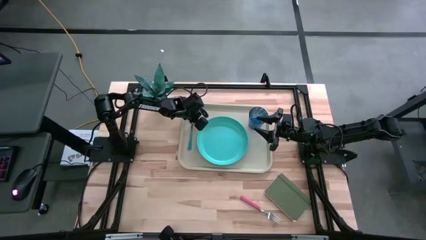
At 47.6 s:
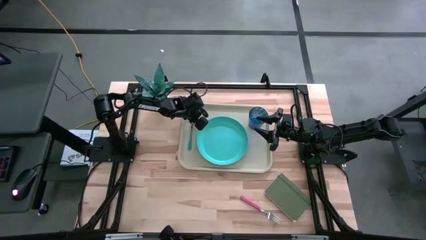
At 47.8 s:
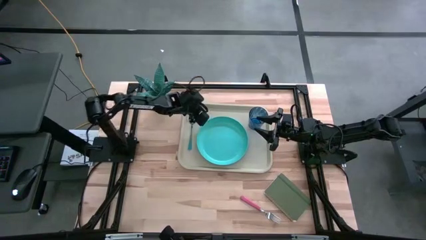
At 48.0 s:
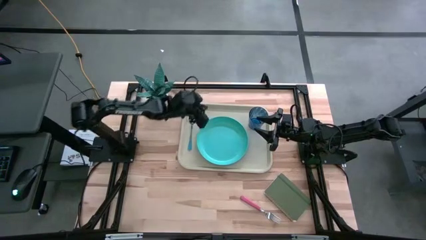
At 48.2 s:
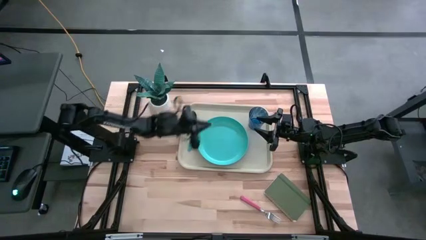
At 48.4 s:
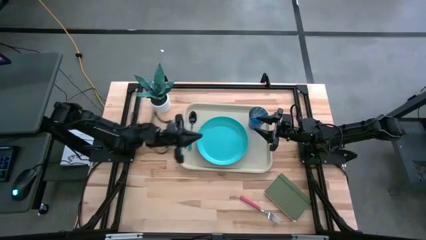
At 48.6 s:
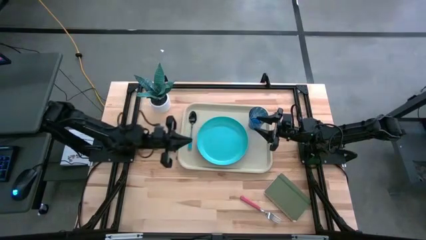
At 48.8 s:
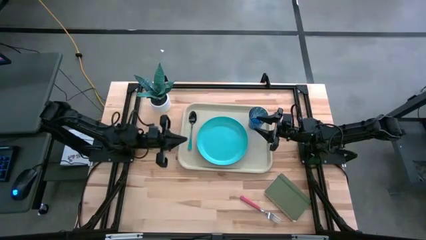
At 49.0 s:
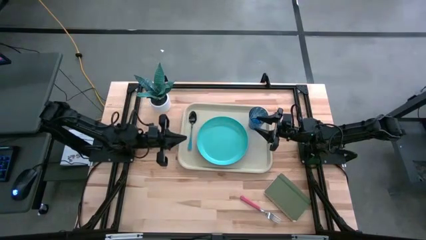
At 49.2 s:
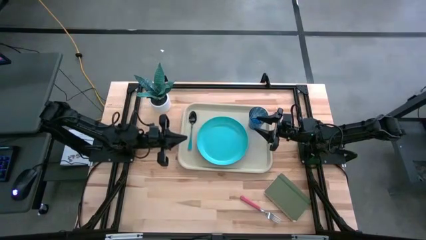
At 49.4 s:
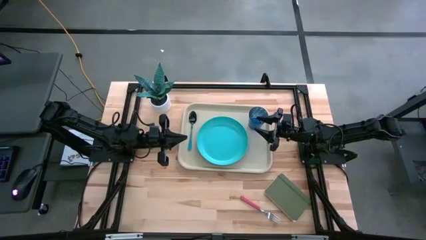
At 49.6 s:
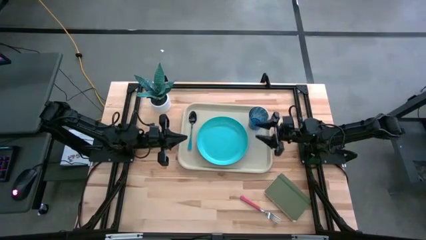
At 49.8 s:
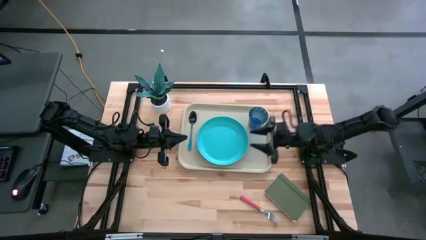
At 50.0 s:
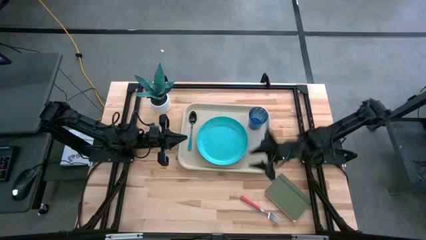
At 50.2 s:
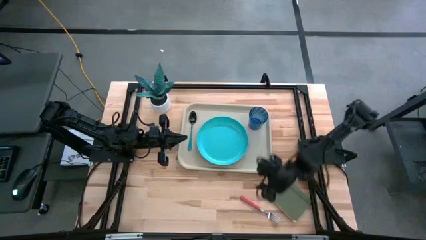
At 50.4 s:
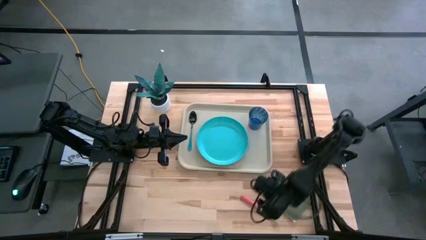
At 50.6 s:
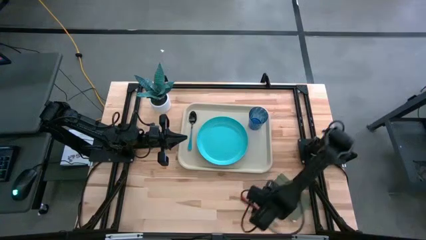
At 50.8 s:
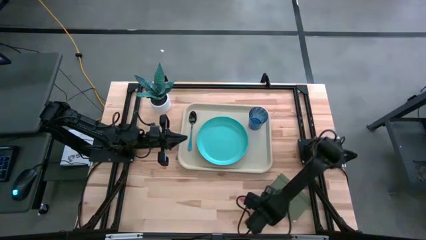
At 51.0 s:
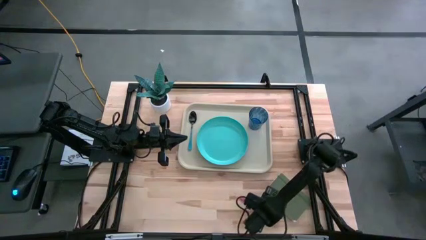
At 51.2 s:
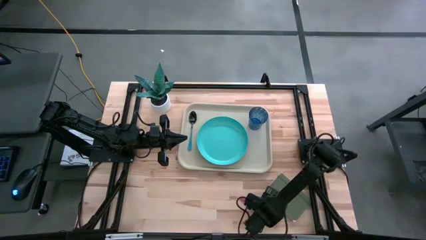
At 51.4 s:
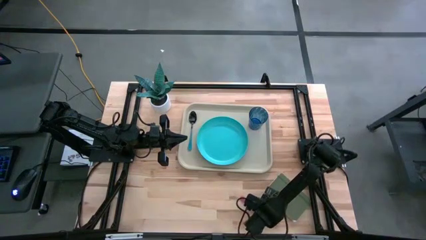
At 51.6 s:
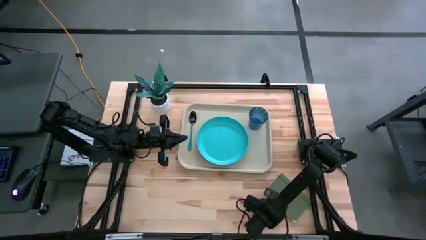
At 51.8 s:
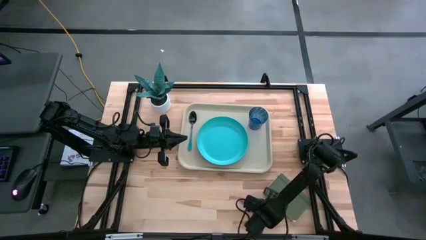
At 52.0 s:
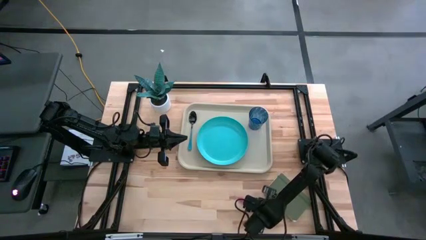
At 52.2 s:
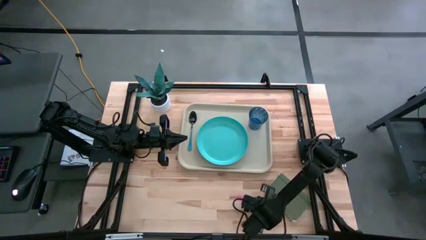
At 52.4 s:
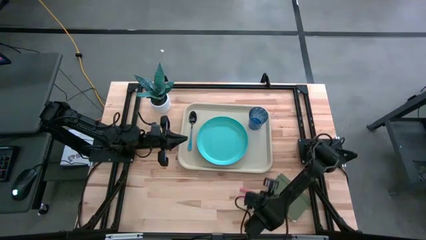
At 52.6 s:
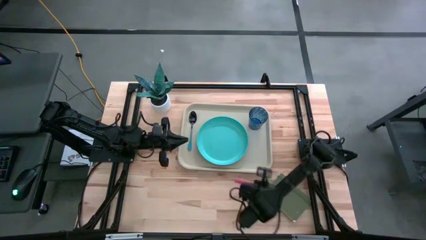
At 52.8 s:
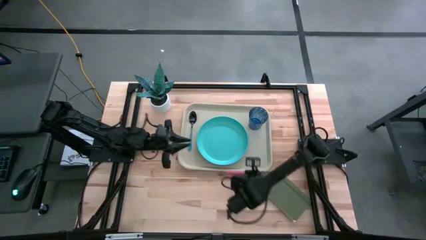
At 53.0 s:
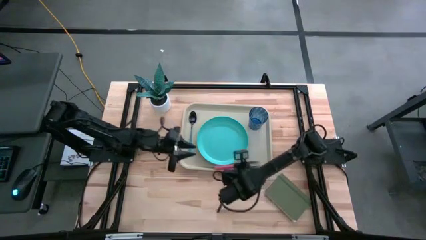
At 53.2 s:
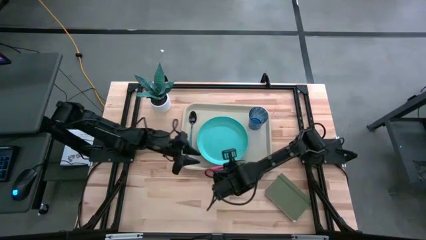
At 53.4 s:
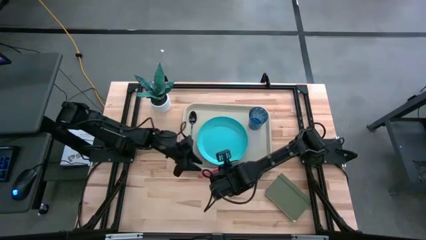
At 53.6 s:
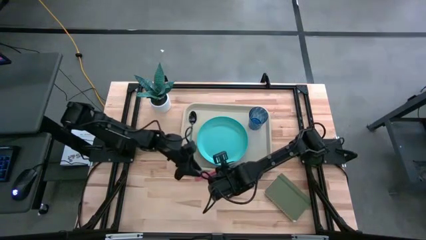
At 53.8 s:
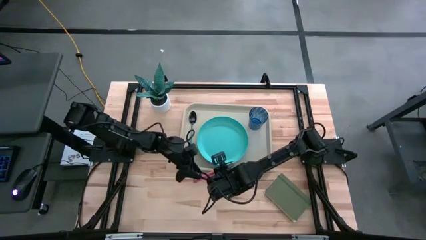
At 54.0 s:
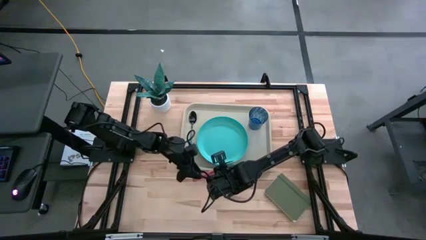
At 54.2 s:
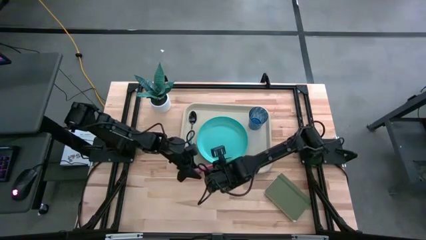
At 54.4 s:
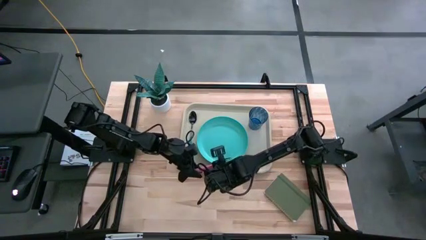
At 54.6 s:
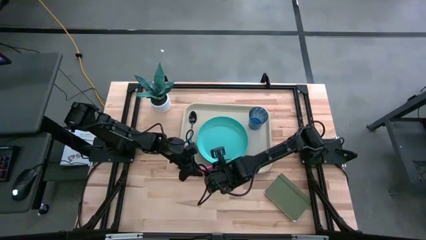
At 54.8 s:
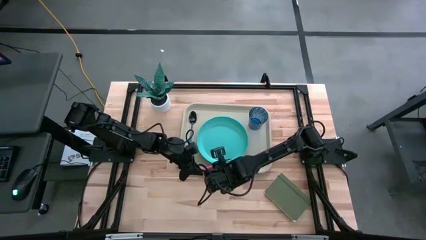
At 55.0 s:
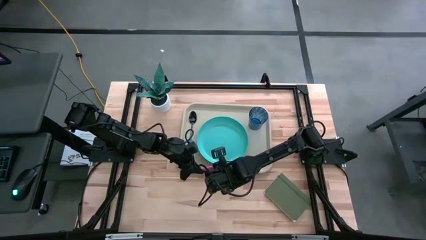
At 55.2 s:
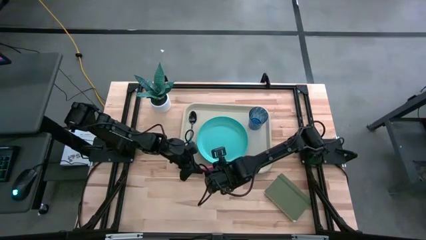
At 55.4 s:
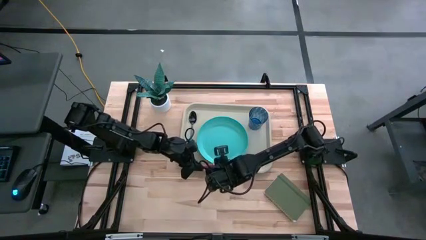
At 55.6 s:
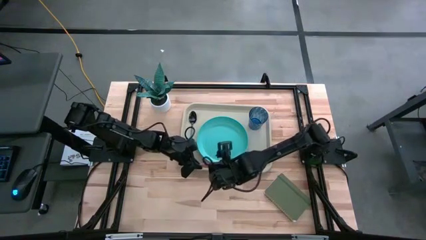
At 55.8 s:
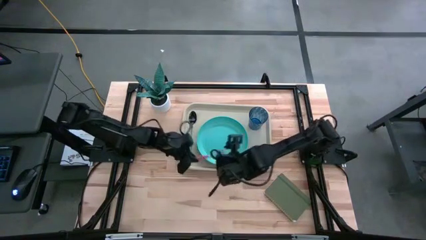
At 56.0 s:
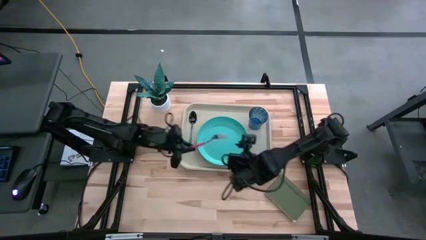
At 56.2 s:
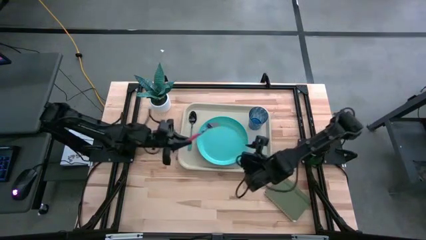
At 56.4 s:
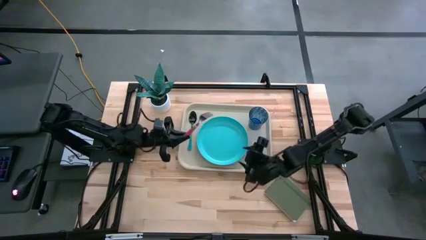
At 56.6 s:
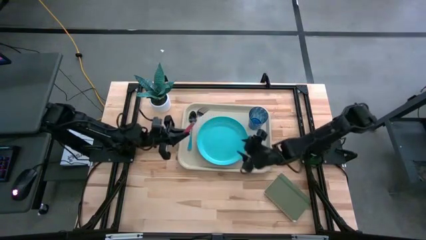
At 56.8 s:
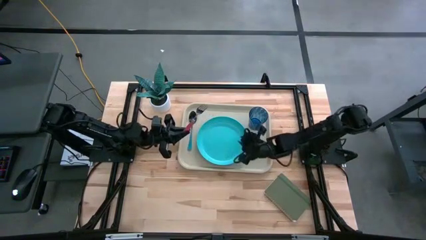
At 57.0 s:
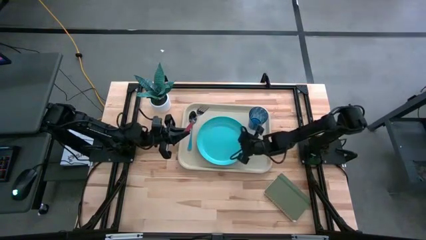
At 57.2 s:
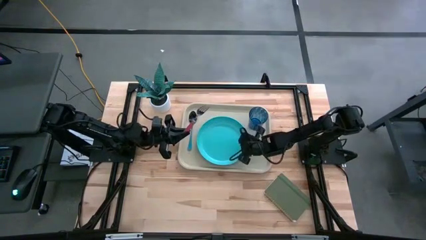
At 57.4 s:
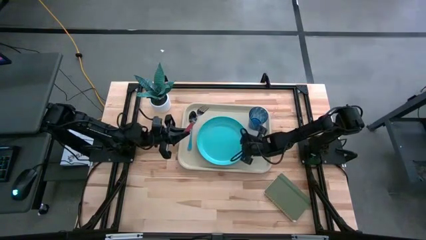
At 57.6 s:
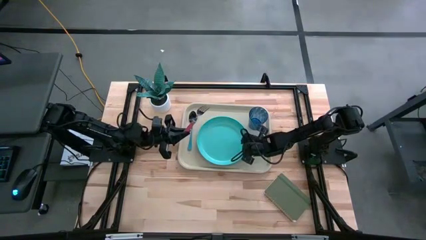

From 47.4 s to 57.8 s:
Task: Pick and place plate/cup/fork/spoon on tray
Put the red fork to the right of the blue spoon on the light brown serving tray

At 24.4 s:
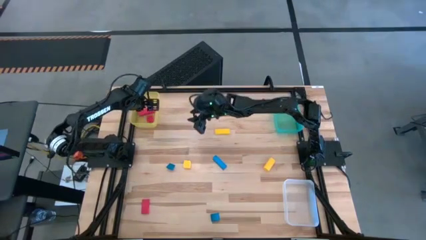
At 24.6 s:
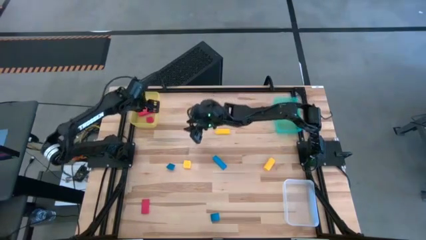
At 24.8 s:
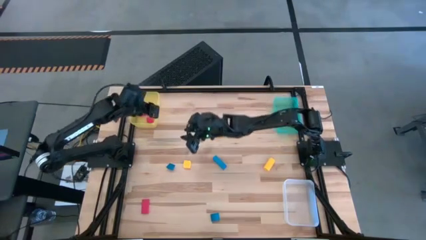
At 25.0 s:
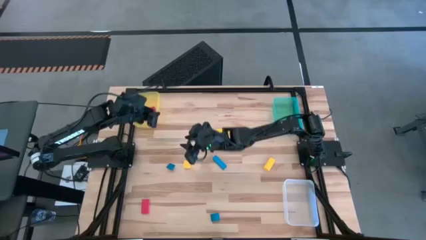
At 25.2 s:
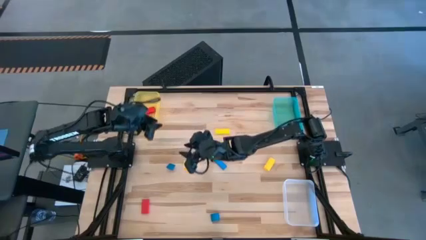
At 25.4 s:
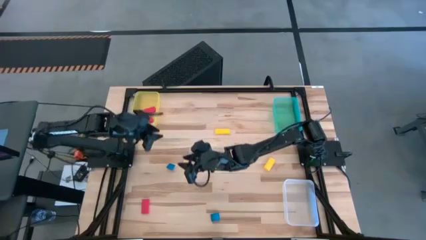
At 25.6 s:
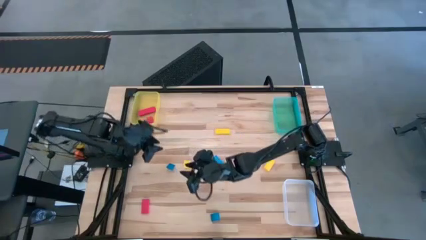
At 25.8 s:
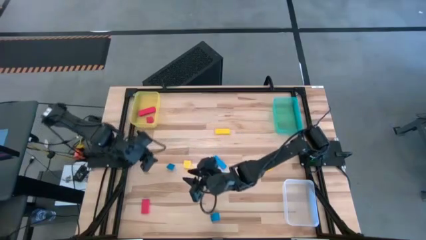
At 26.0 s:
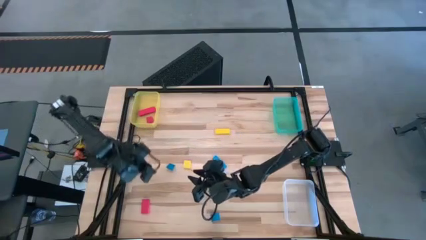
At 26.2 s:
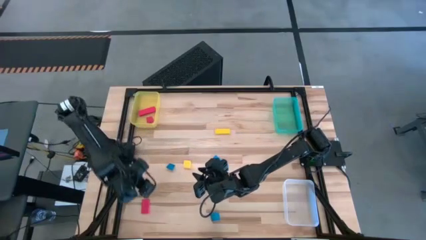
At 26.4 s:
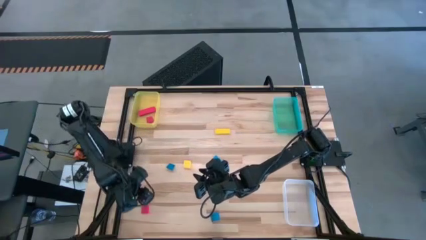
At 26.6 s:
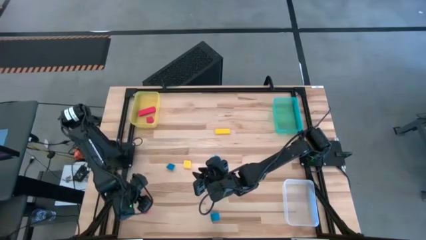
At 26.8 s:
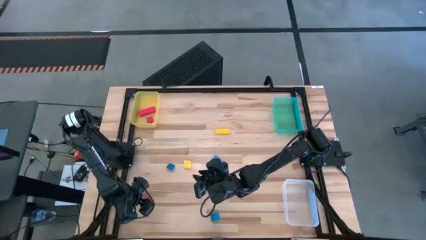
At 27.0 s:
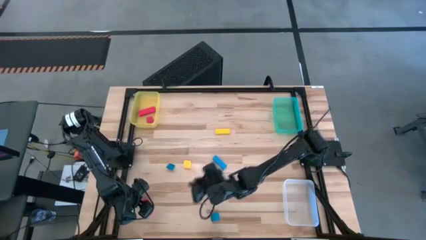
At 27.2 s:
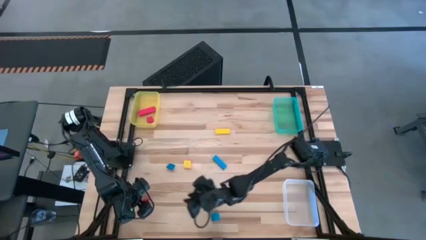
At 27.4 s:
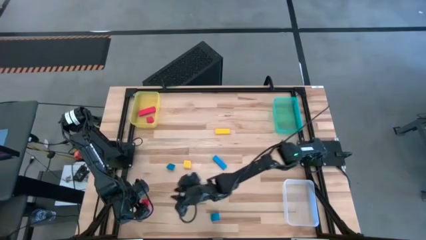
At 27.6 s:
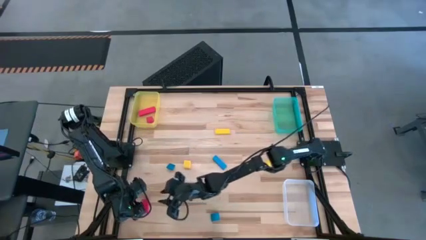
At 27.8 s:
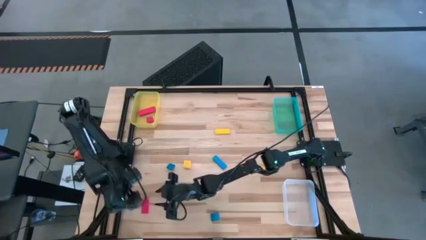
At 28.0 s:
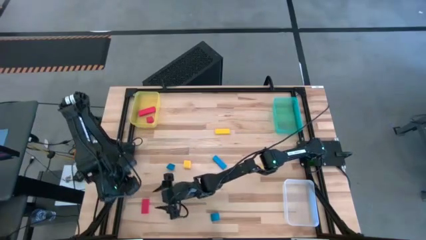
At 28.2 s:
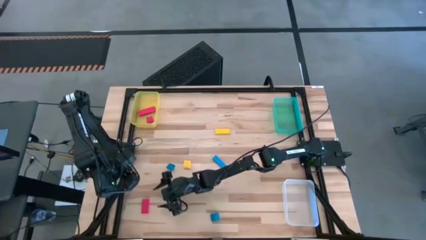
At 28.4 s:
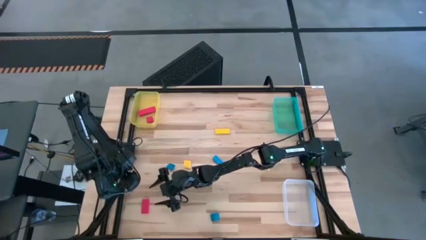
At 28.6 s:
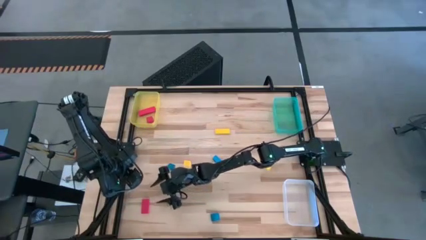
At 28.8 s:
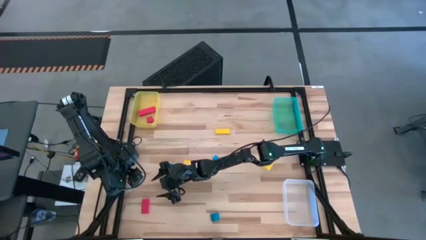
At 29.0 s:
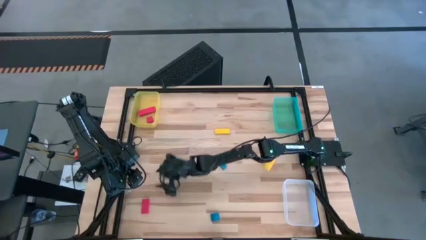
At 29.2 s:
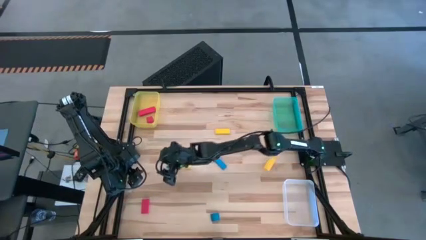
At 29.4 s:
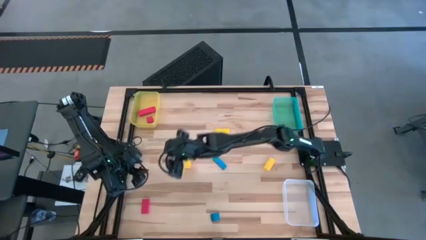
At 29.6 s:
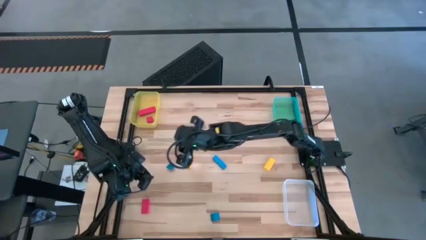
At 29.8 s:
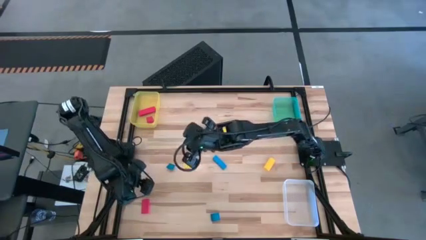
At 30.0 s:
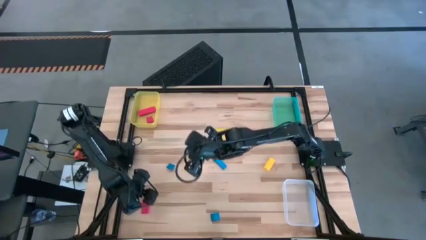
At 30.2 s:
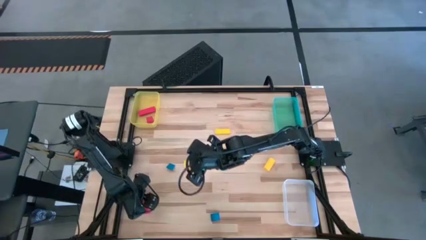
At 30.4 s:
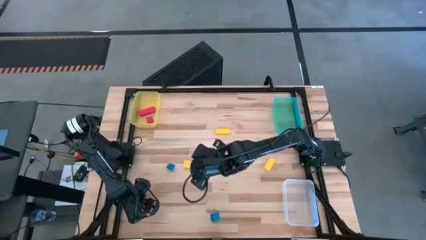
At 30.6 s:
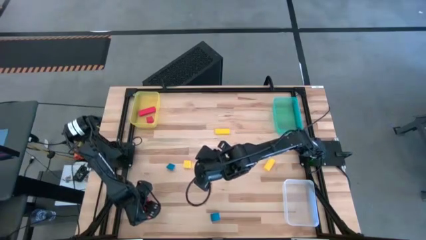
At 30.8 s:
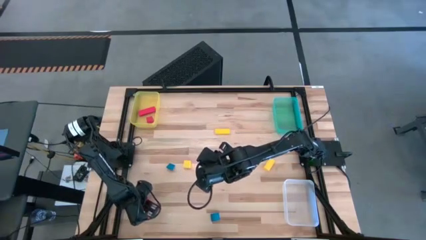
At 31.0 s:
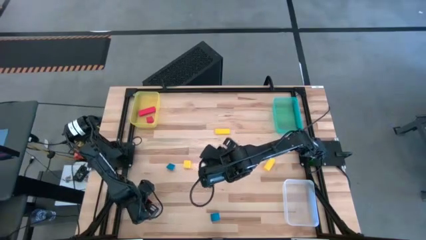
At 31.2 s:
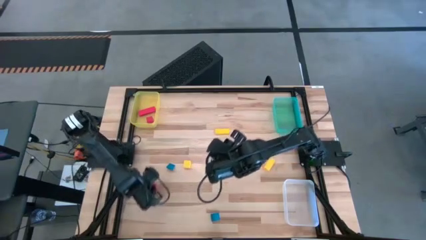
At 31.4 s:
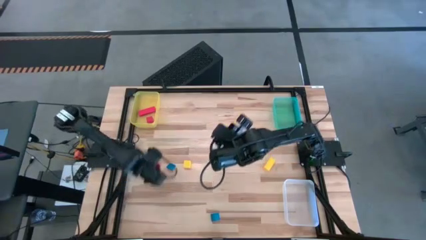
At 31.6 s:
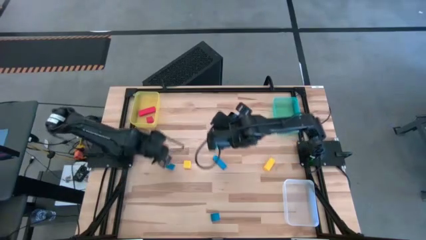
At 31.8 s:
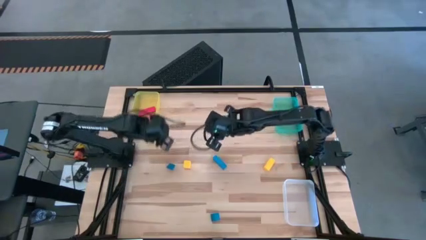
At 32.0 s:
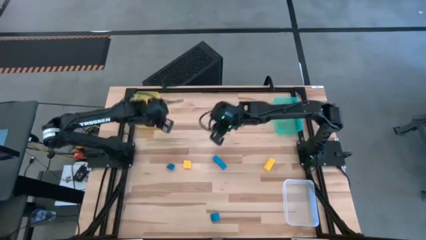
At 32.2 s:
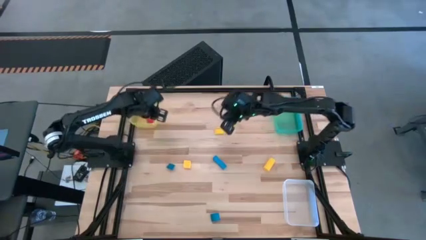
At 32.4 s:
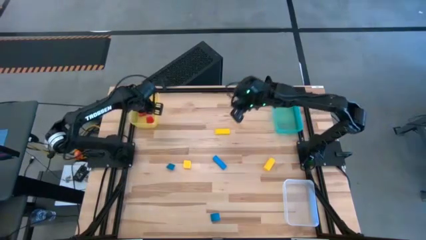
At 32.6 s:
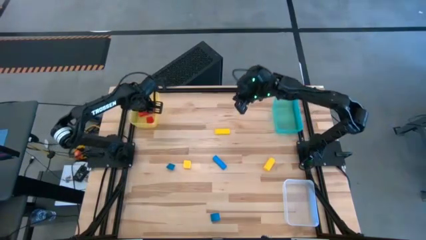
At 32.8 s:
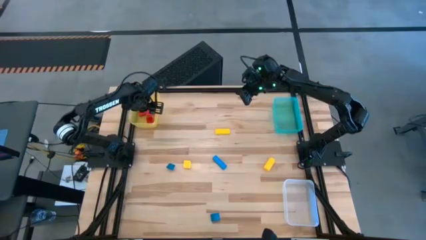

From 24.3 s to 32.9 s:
Task: Sort & place blocks by color
Put the red block into the yellow bin
